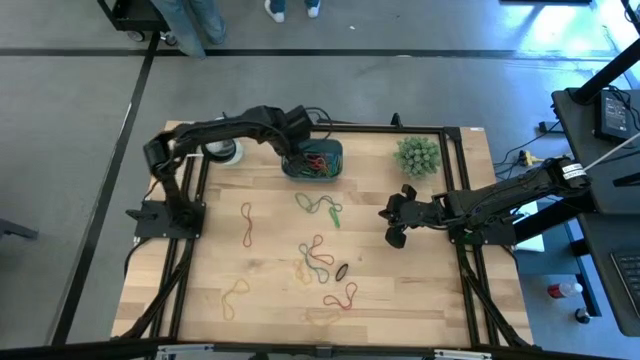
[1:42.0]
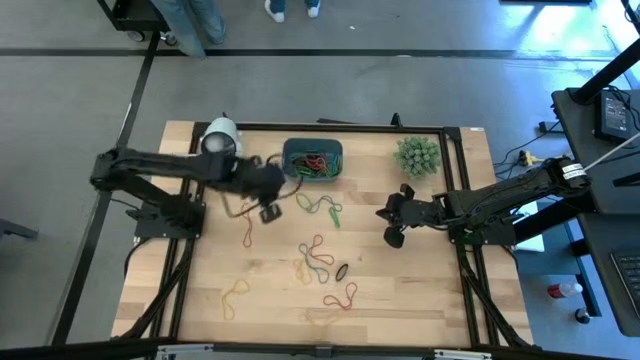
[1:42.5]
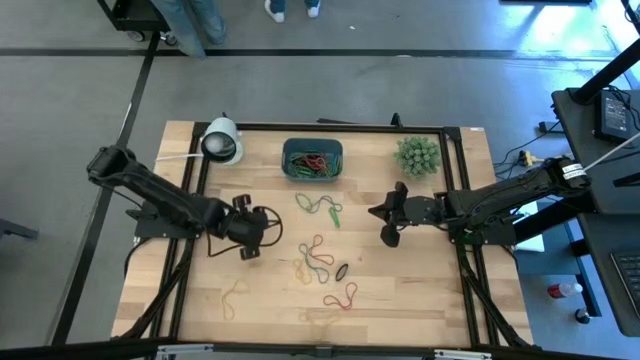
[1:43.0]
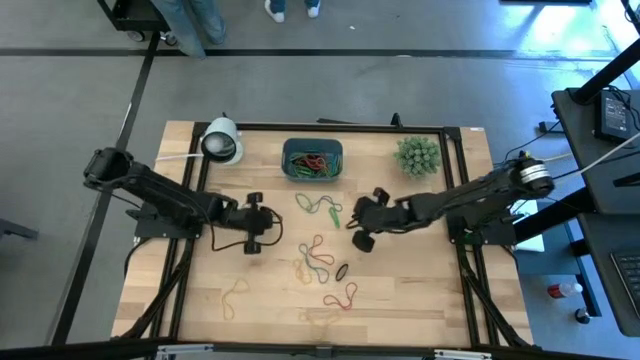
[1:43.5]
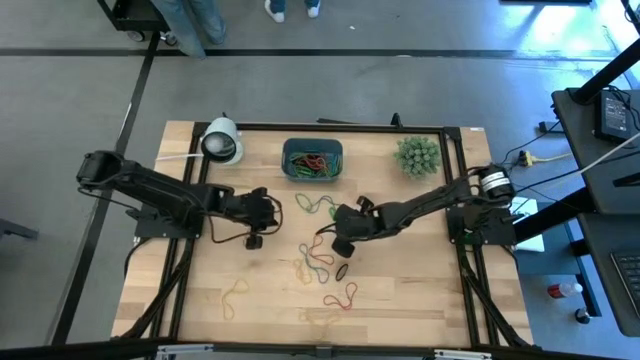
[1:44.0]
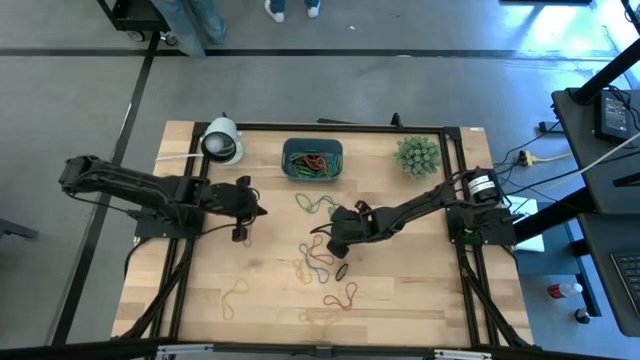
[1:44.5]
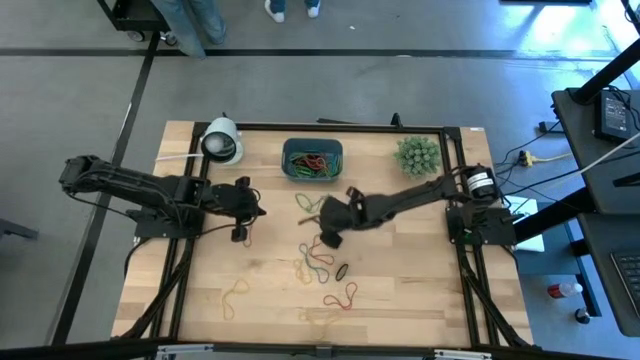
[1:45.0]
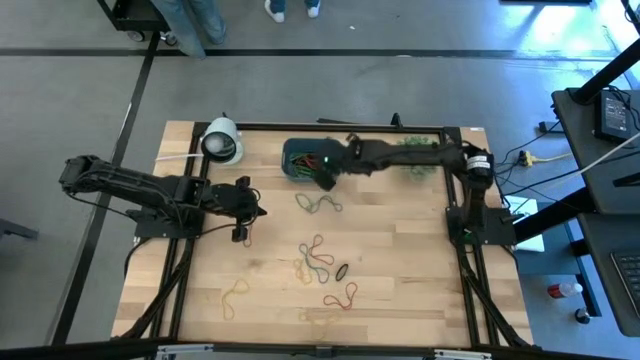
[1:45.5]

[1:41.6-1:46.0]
Task: Pick and place rubber bands into bin
Put the green rubber band into the blue bin

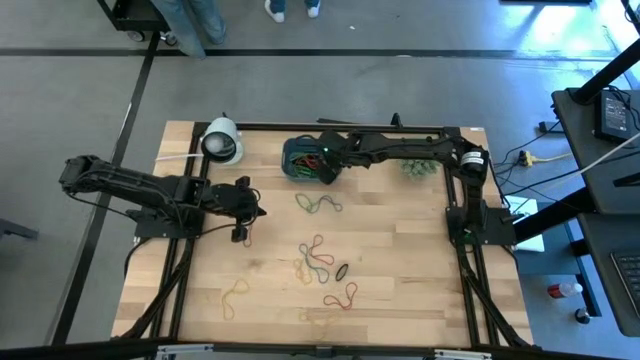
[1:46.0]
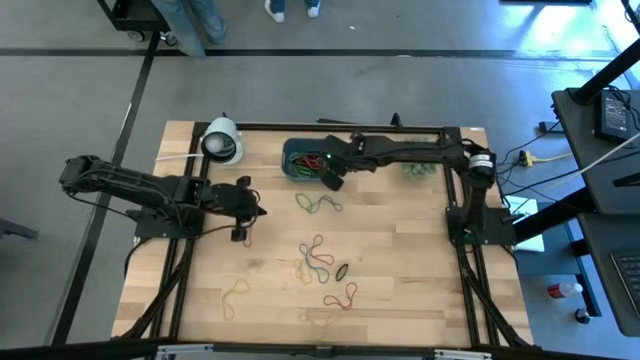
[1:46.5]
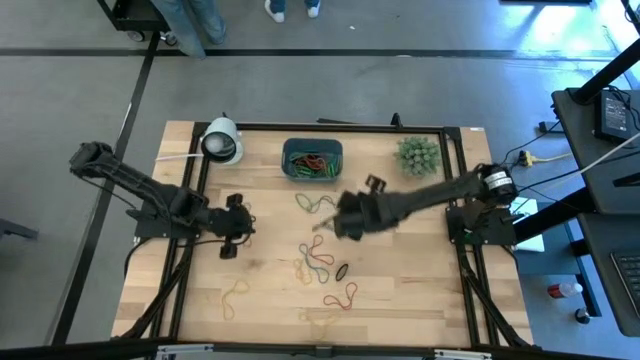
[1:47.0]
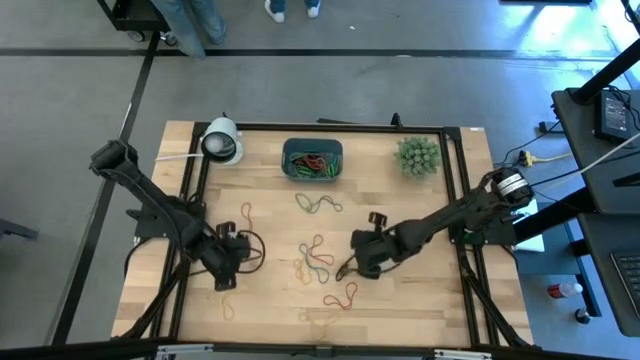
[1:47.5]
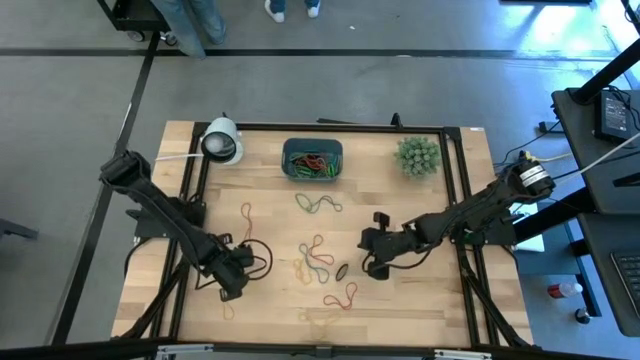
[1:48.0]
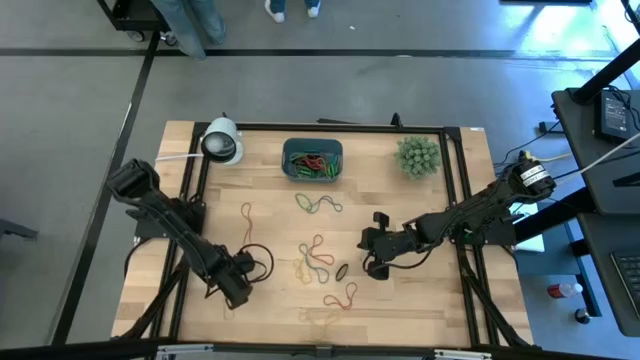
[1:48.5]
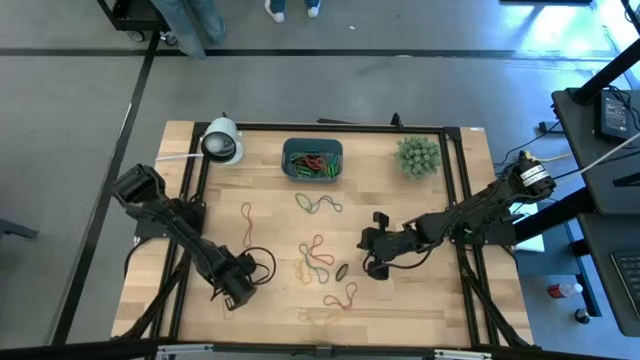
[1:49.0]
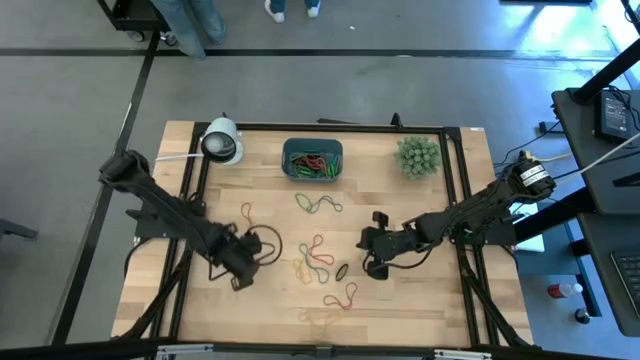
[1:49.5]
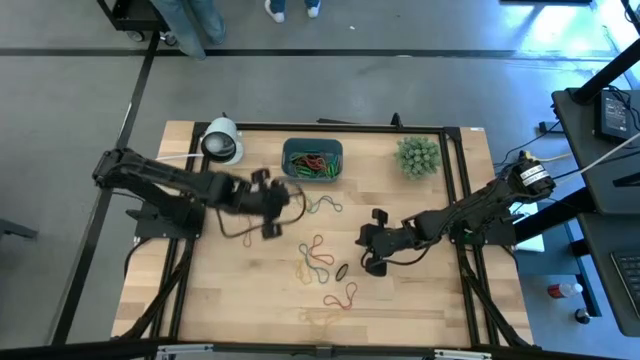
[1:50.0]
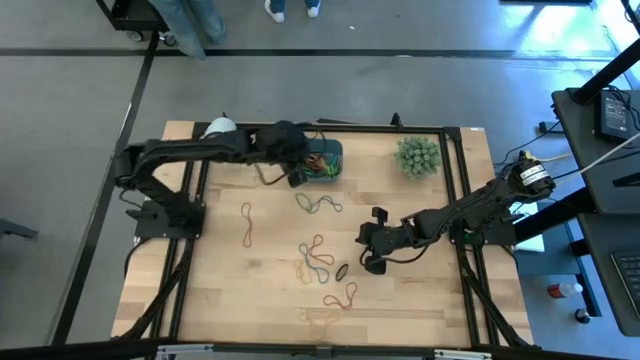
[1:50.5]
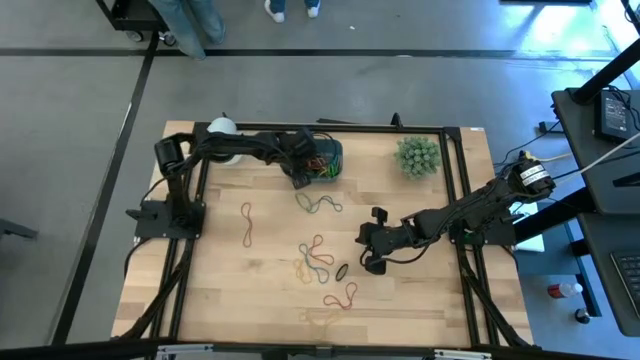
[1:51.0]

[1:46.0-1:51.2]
Put the yellow rubber band into the blue bin

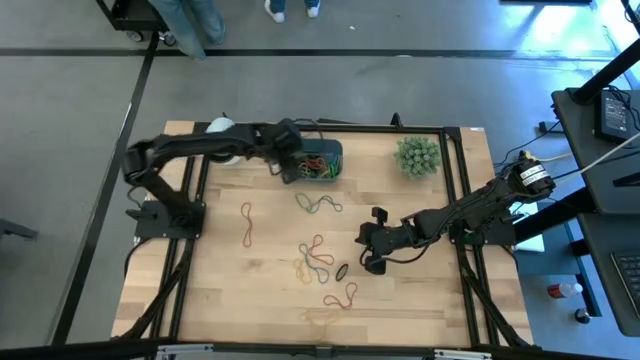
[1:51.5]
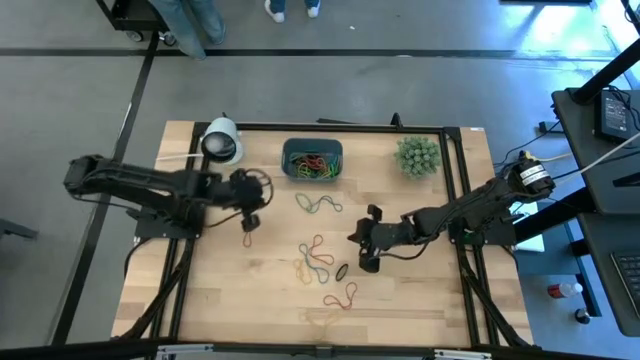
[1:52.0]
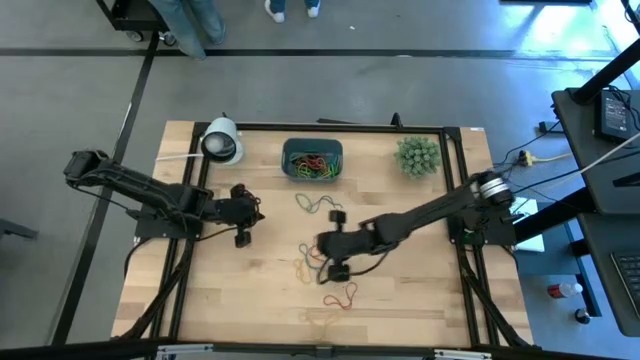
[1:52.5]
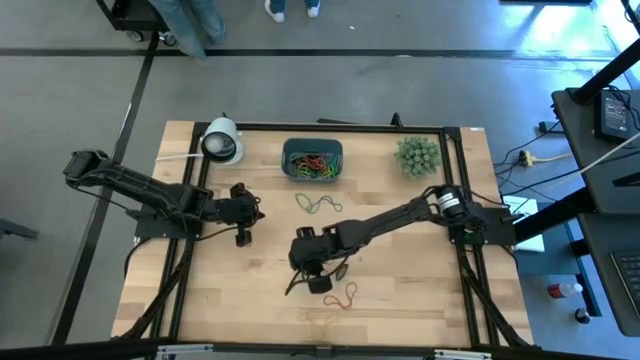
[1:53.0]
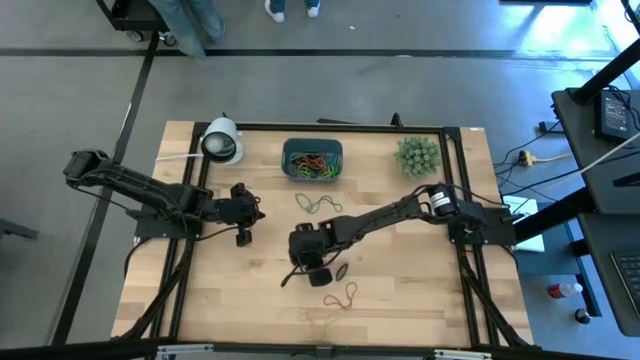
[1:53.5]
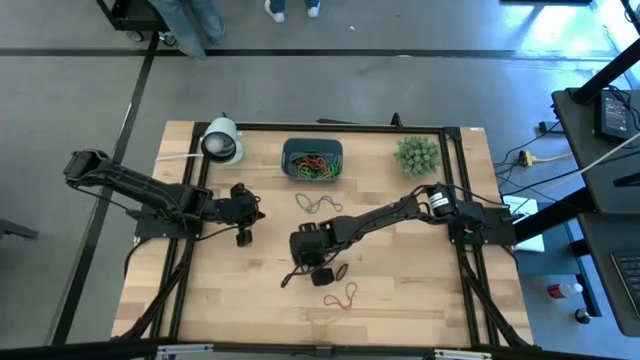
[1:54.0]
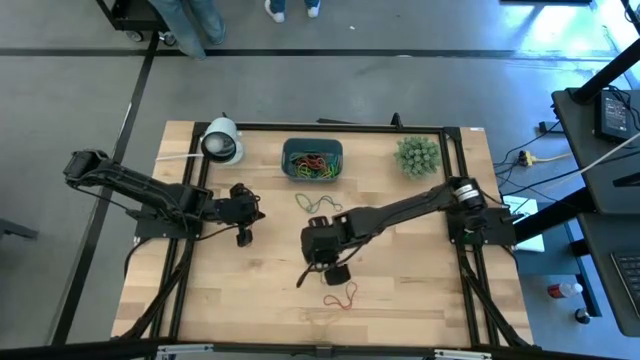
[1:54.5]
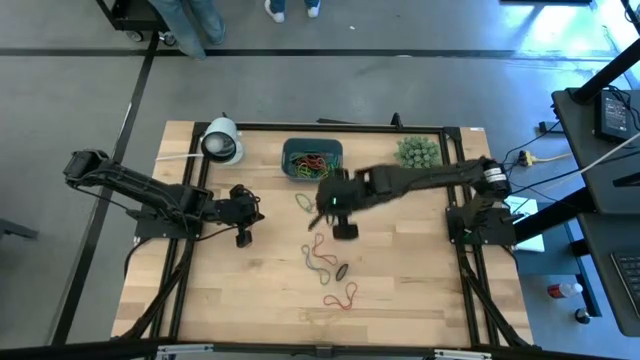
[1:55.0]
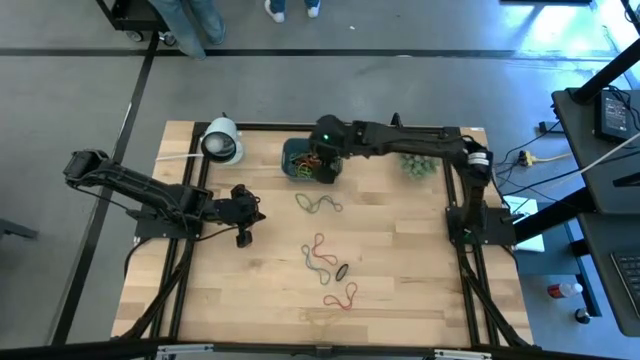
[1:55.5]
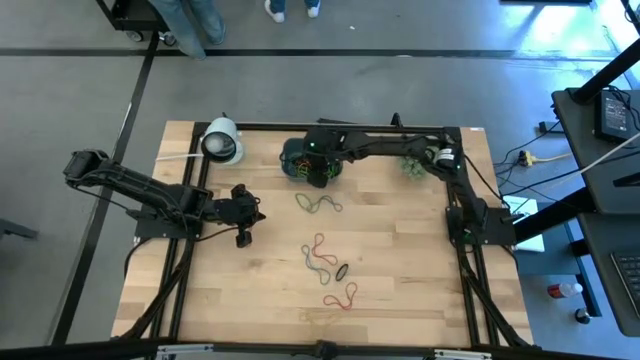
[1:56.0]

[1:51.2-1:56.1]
Put the yellow rubber band into the blue bin

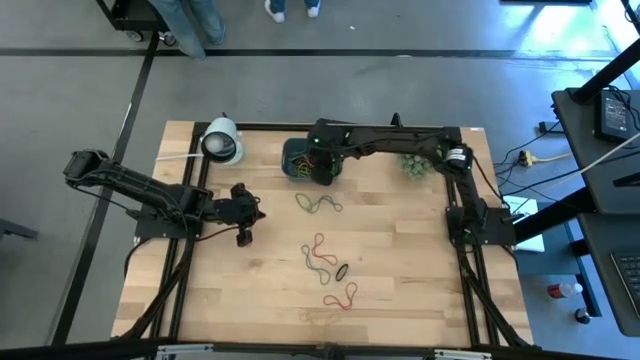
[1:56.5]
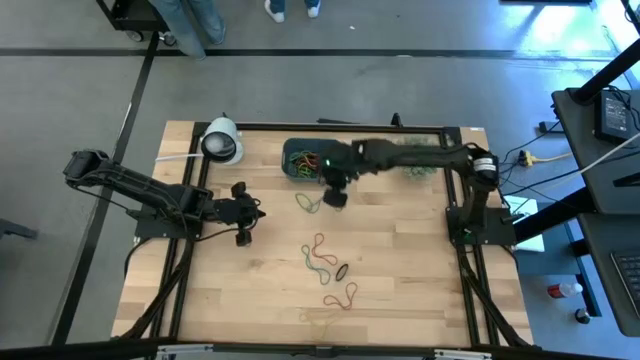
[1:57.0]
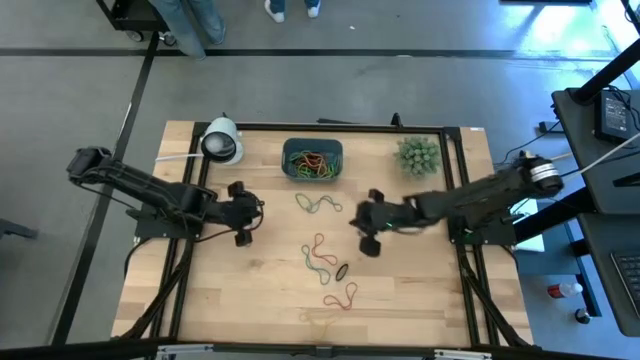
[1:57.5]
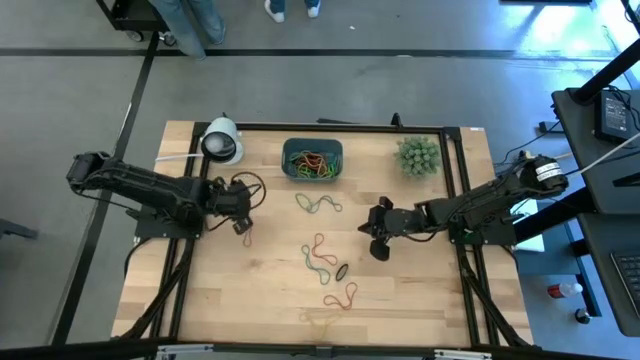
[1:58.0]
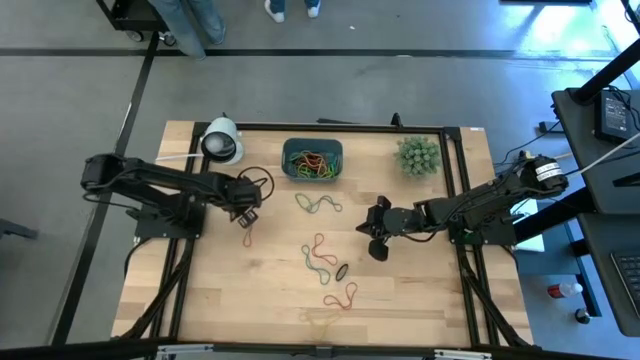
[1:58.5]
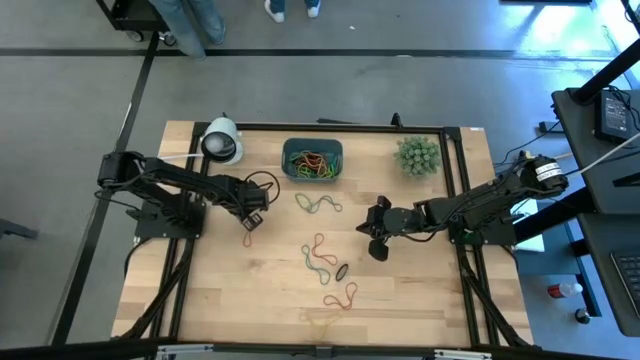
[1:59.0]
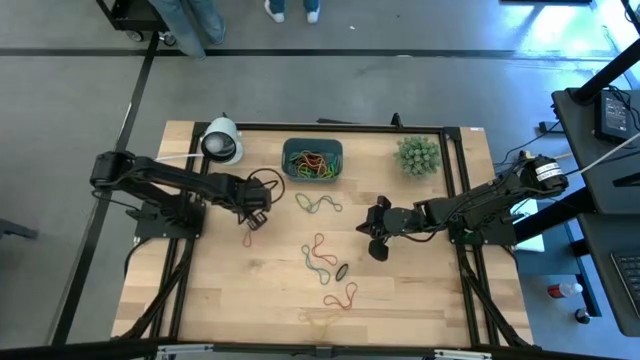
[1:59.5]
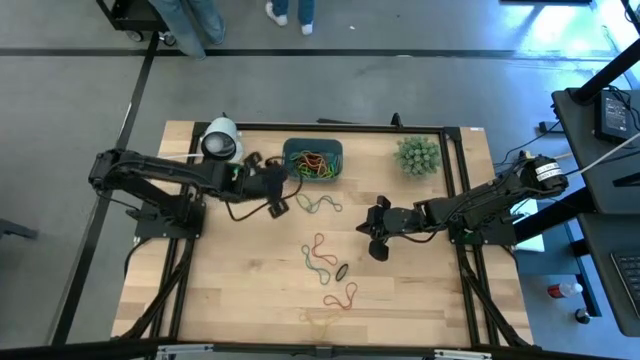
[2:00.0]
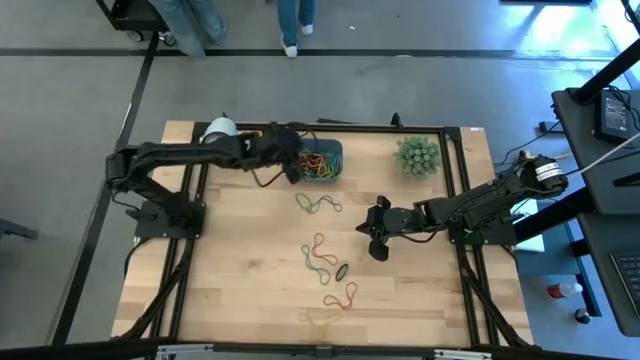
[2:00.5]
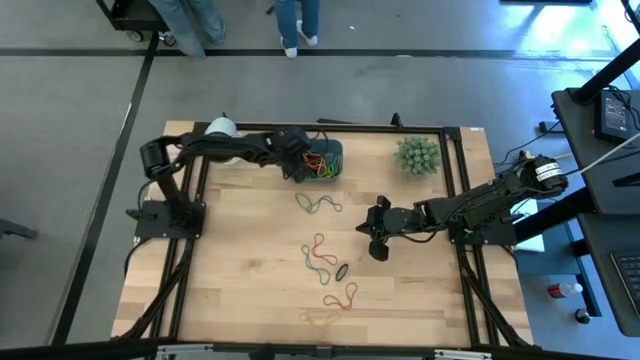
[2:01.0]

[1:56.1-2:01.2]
Put the red rubber band into the blue bin

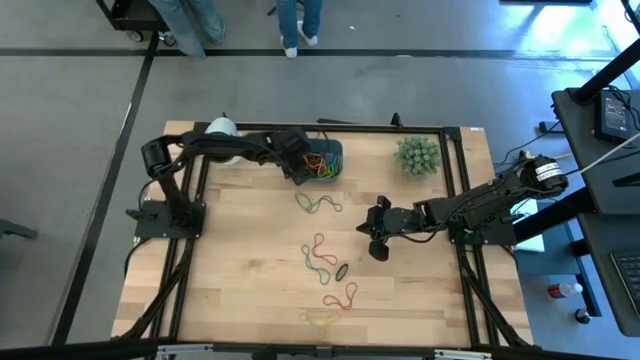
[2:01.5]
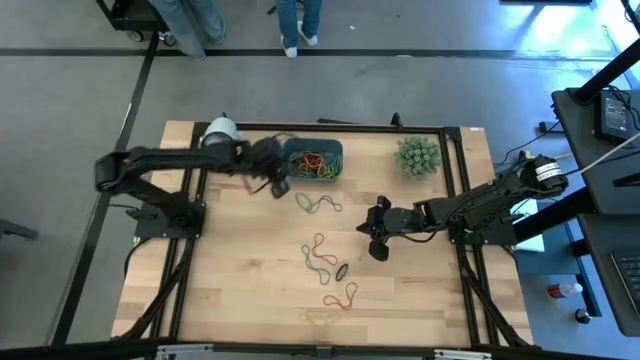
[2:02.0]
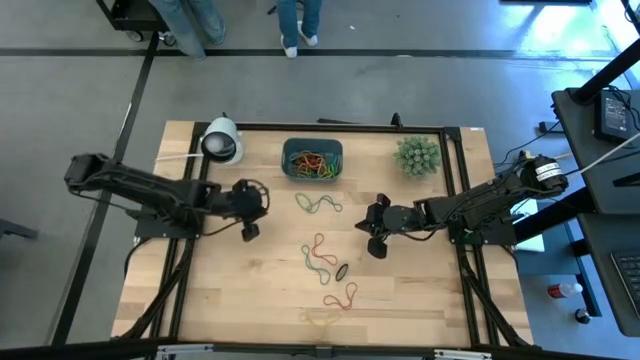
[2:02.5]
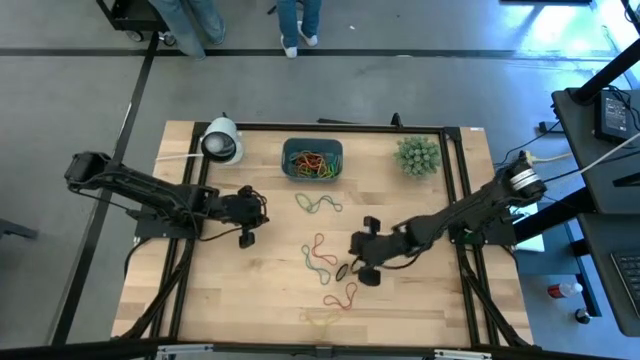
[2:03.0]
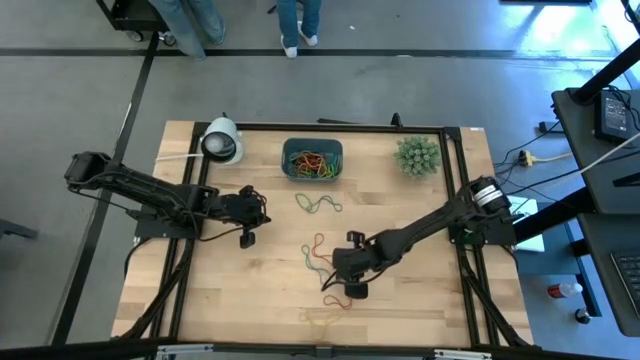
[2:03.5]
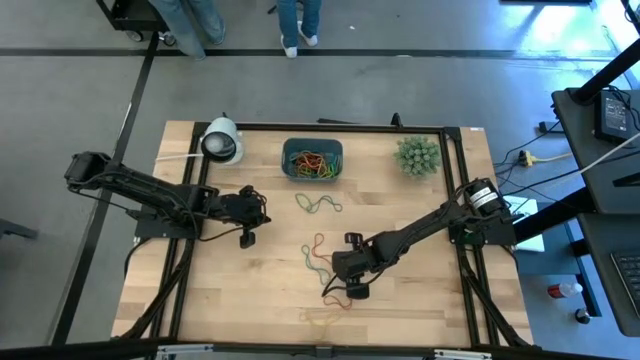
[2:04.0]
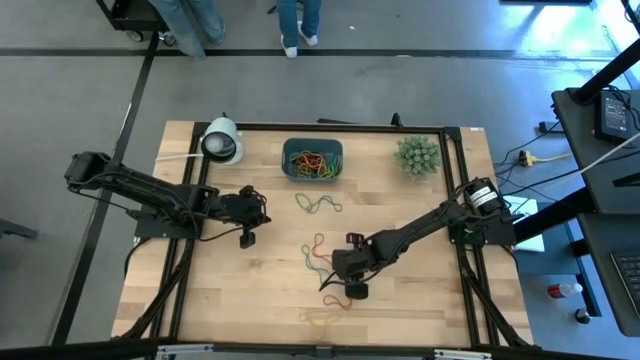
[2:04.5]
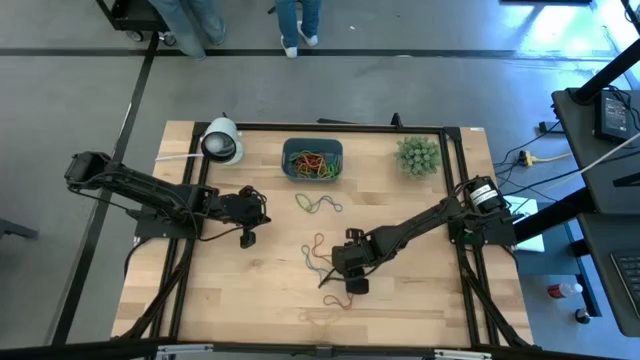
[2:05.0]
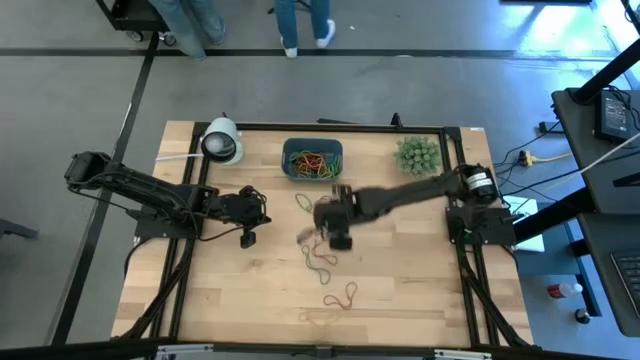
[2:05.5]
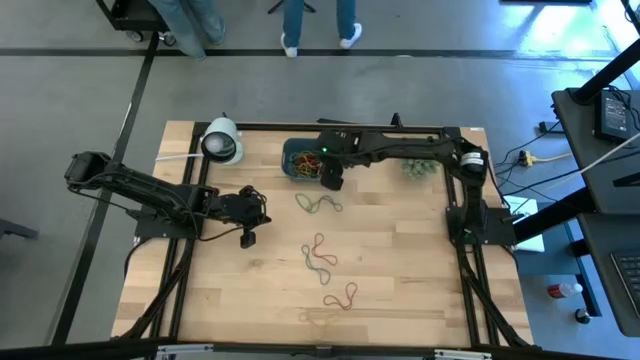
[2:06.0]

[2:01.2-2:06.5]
Put the black rubber band into the blue bin
